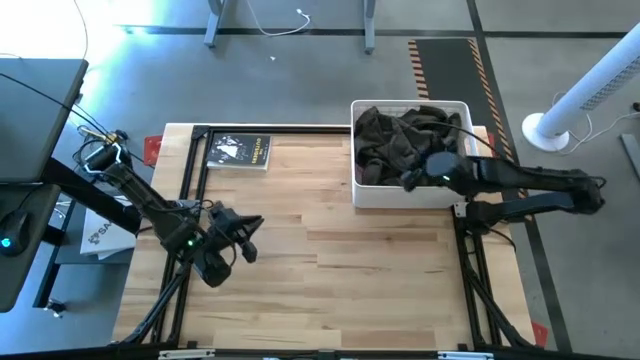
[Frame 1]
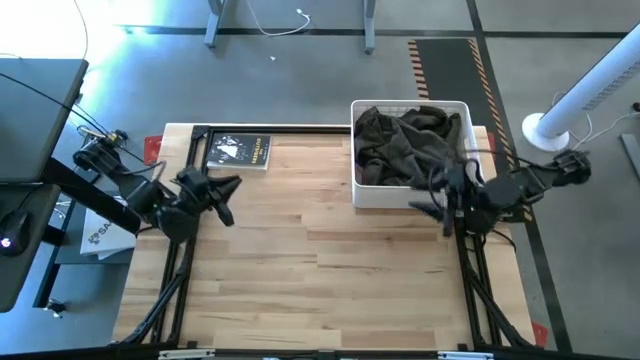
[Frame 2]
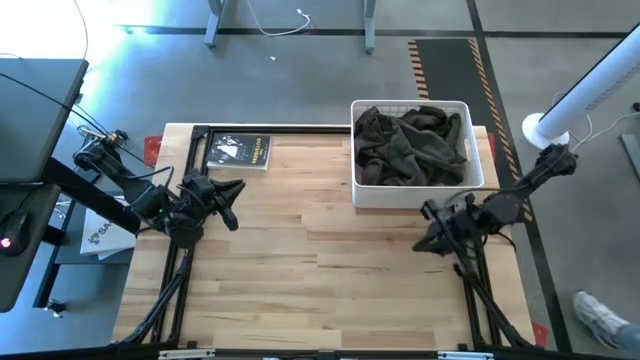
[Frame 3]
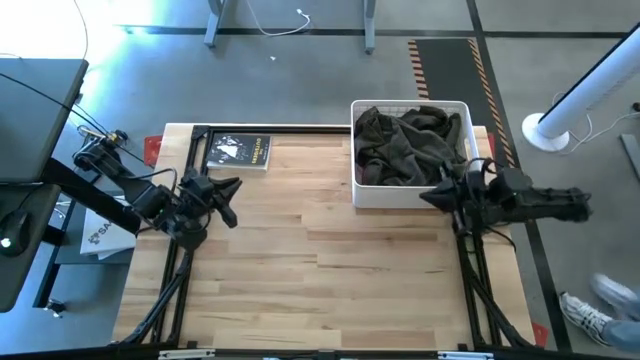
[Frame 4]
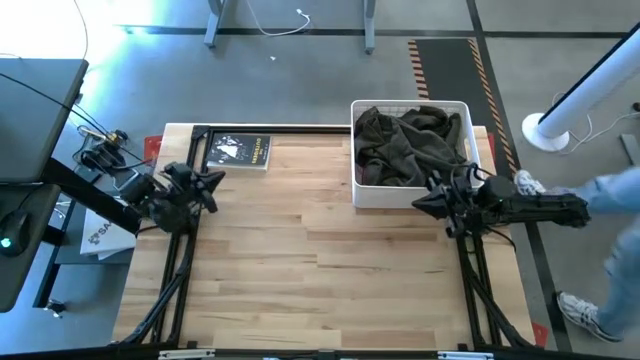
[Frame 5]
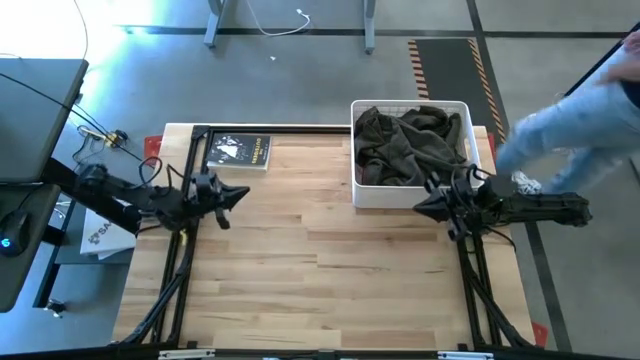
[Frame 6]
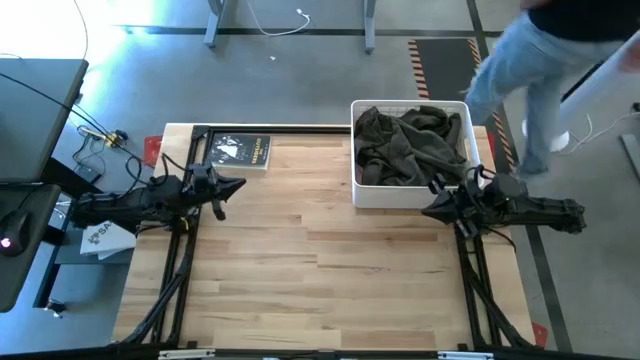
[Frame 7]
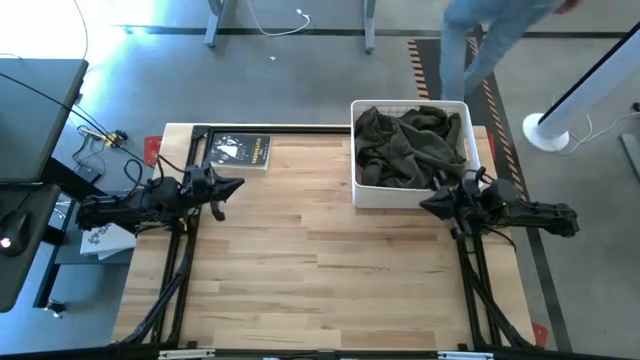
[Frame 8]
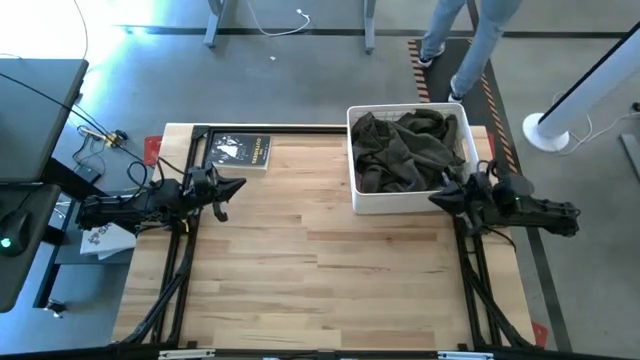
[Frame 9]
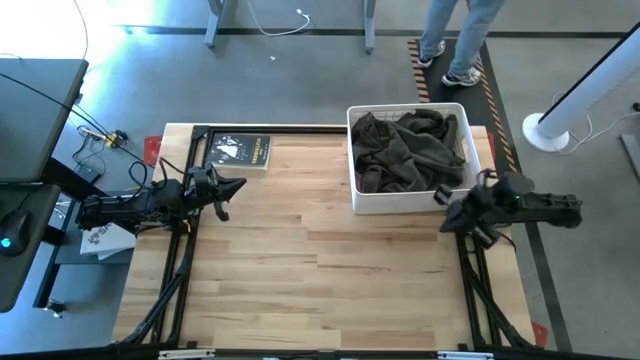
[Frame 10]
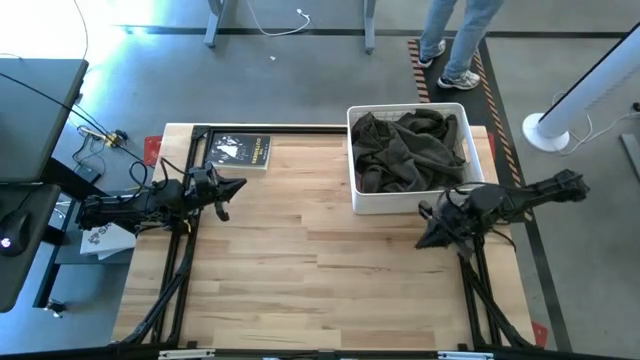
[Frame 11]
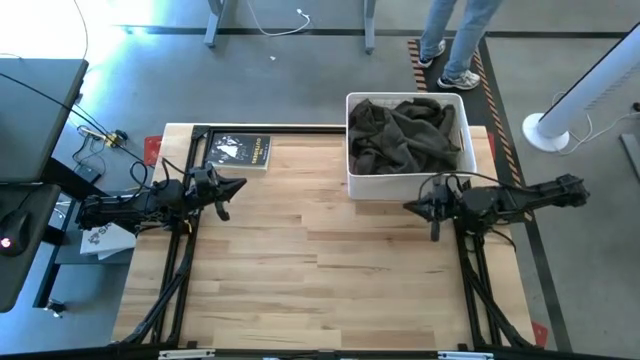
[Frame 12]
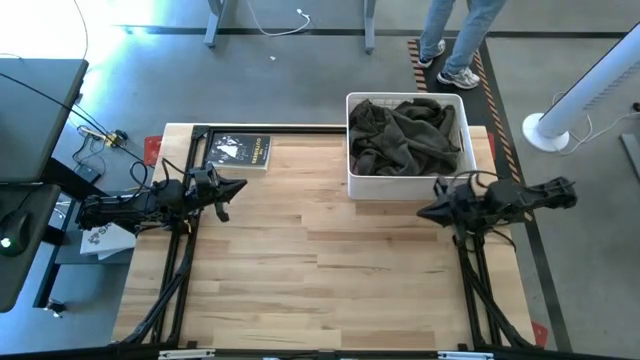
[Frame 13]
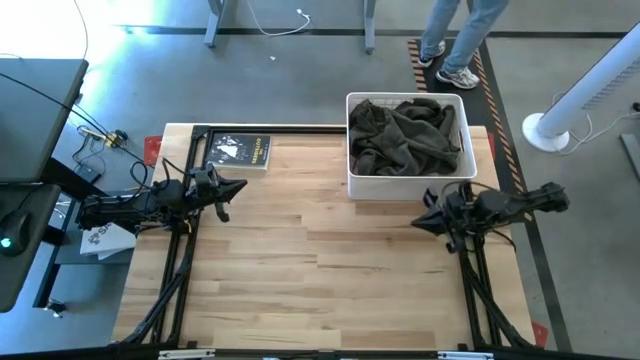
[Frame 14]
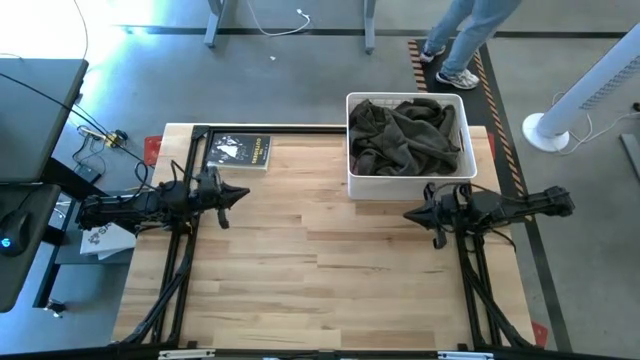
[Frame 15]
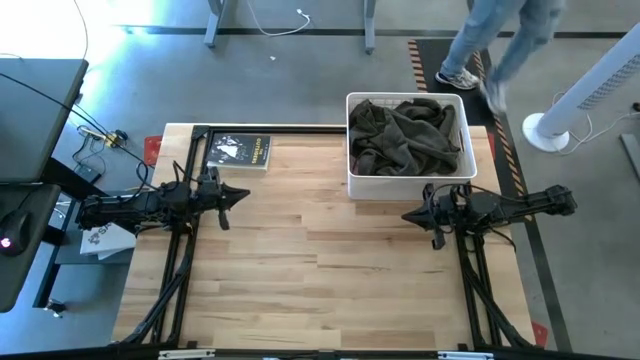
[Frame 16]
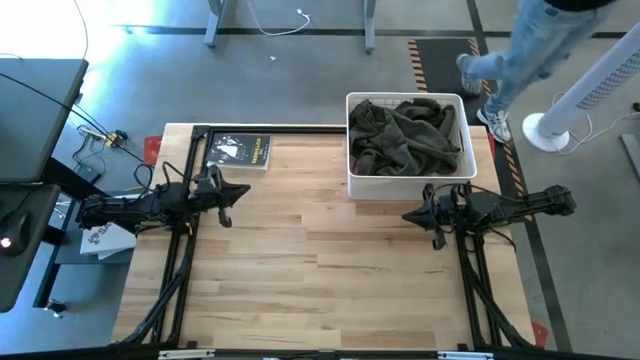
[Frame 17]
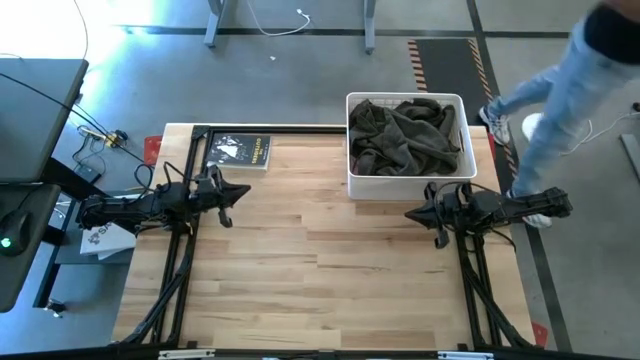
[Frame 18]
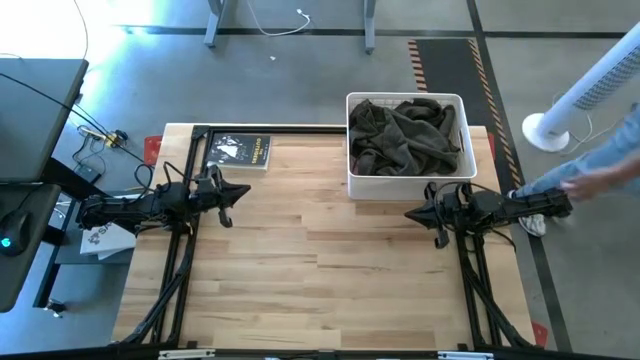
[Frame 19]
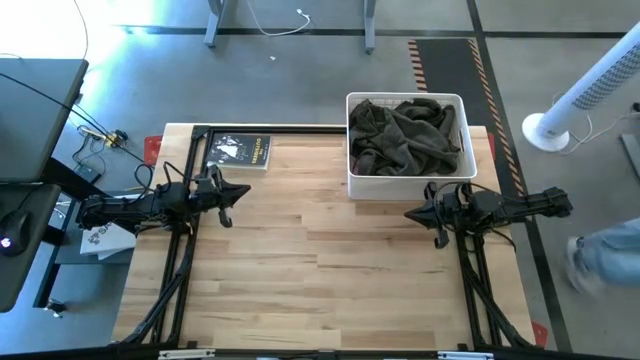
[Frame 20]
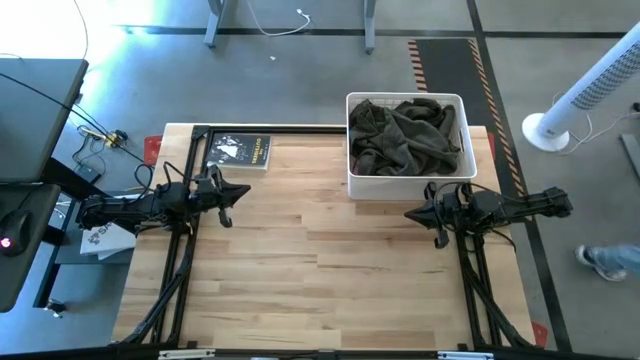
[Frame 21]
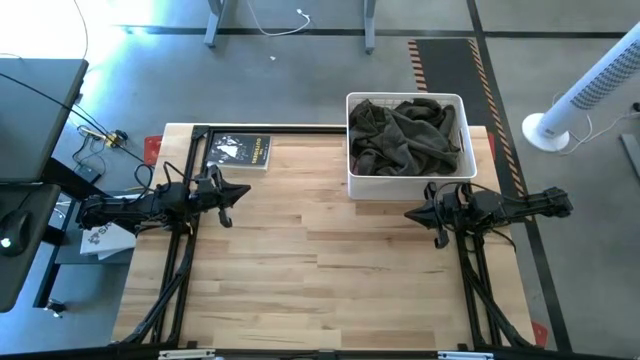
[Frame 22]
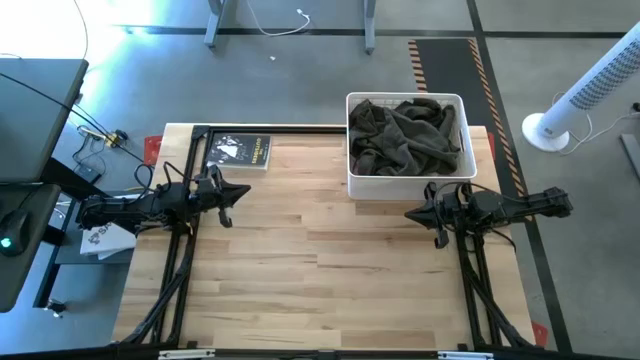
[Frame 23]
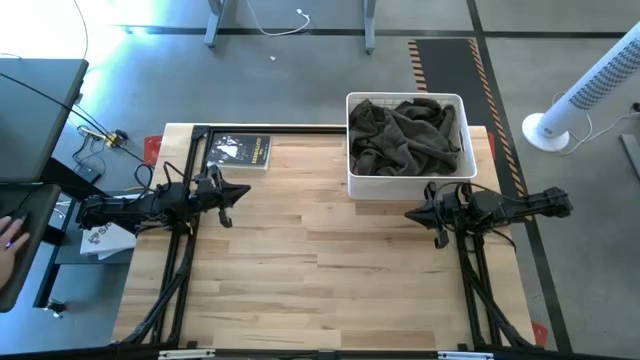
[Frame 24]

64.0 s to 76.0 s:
Task: Sort clothes
Return to Home Position

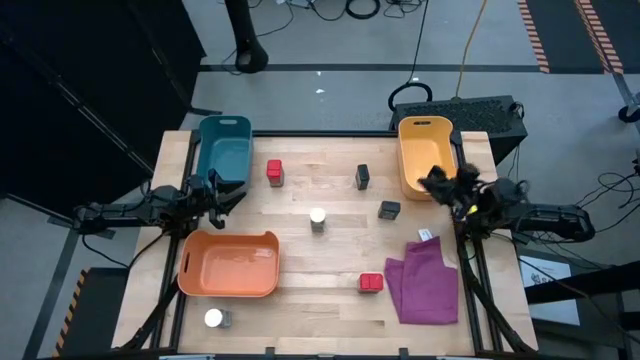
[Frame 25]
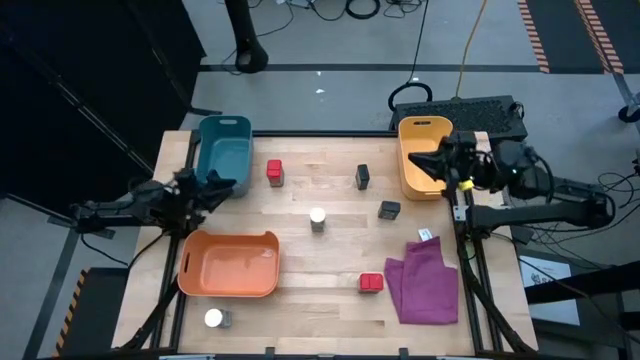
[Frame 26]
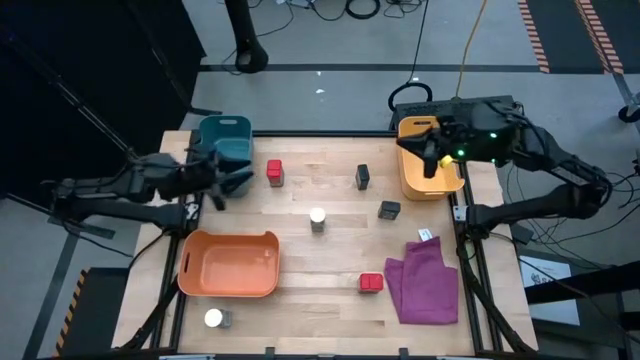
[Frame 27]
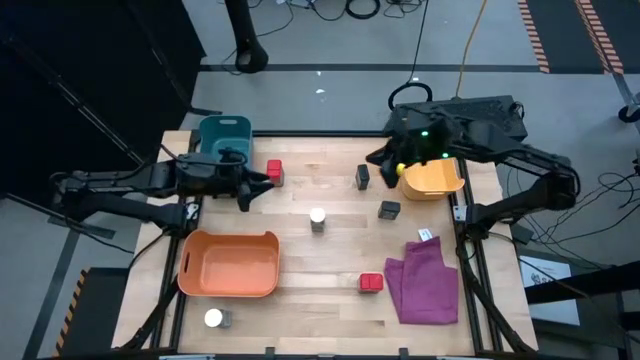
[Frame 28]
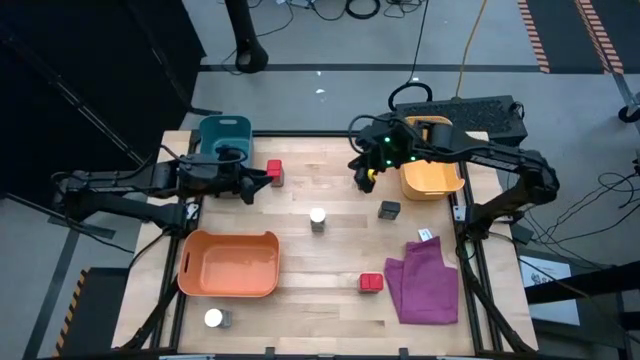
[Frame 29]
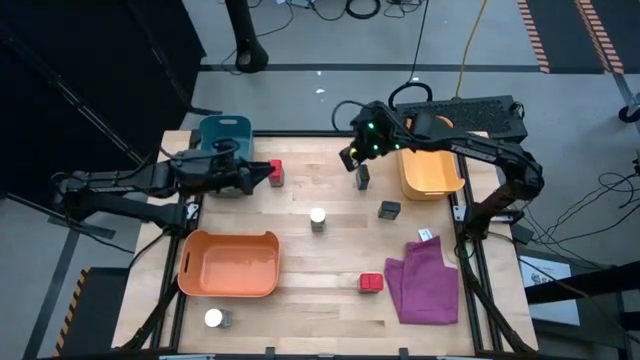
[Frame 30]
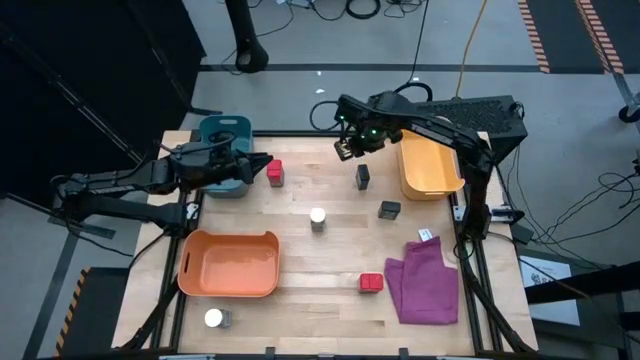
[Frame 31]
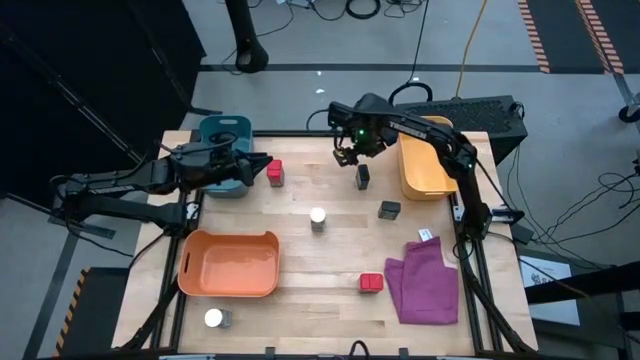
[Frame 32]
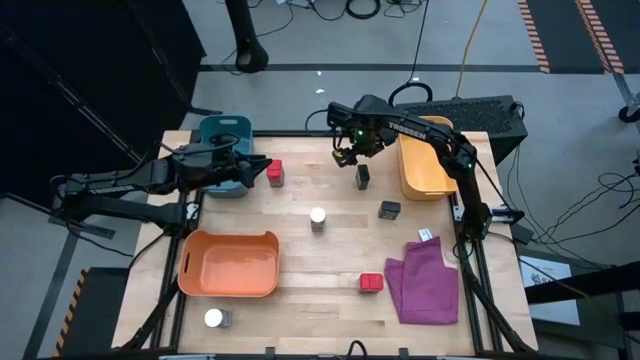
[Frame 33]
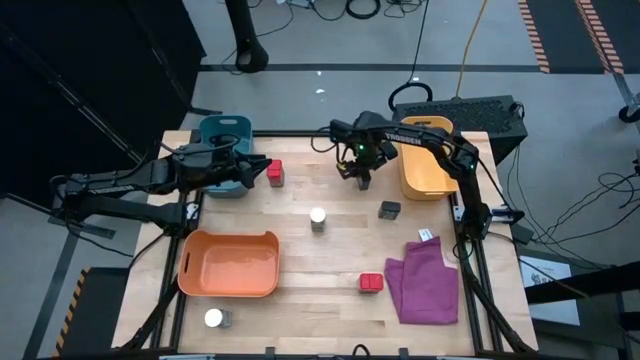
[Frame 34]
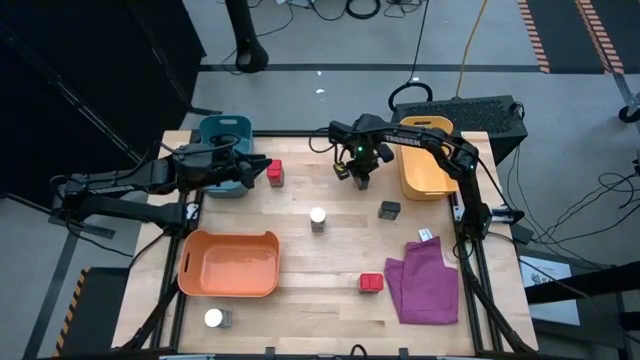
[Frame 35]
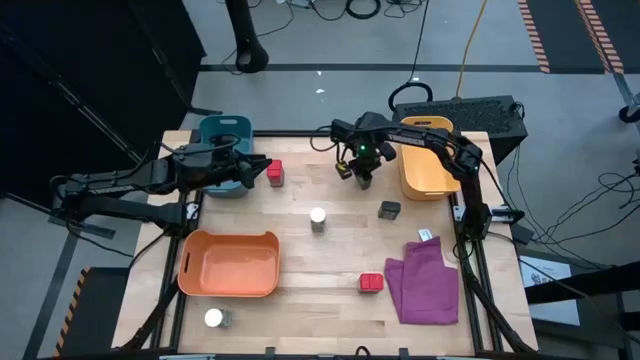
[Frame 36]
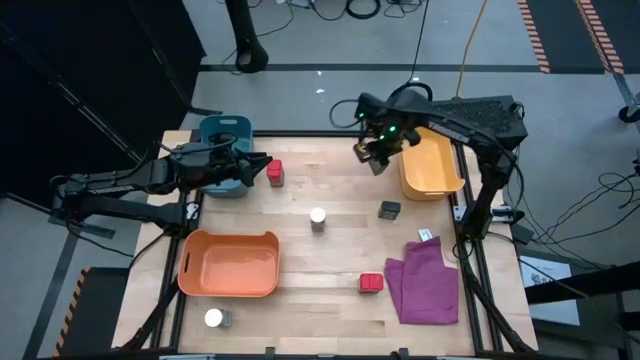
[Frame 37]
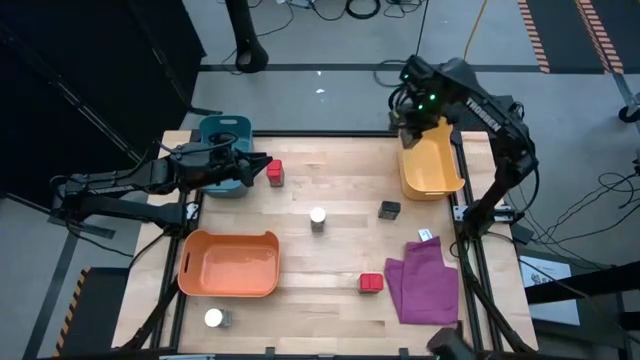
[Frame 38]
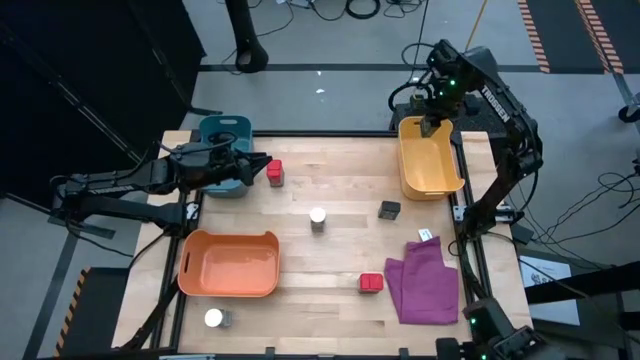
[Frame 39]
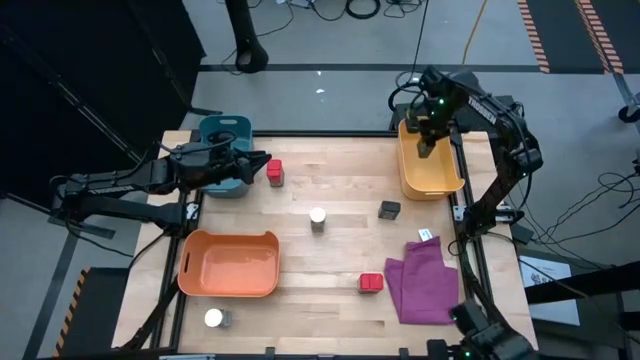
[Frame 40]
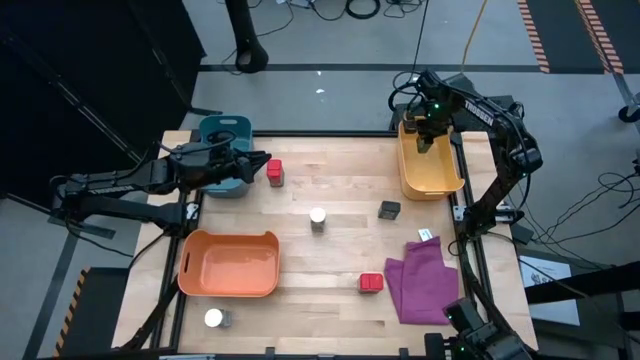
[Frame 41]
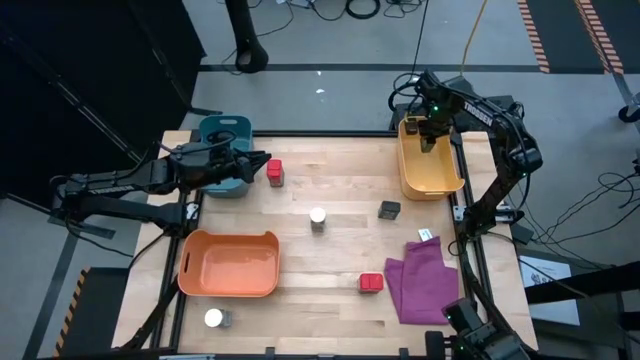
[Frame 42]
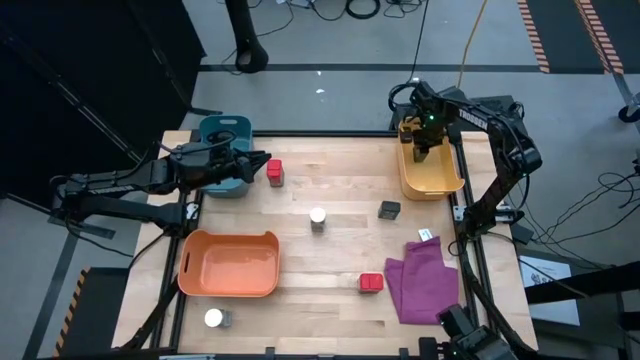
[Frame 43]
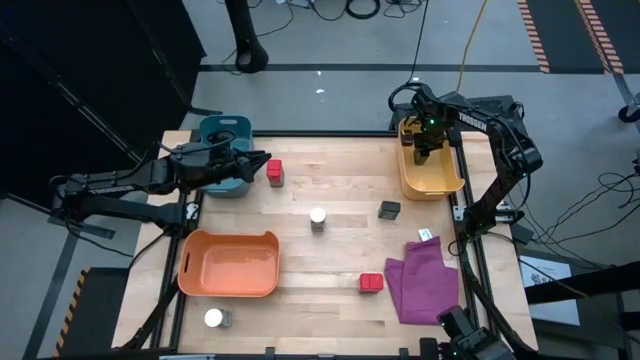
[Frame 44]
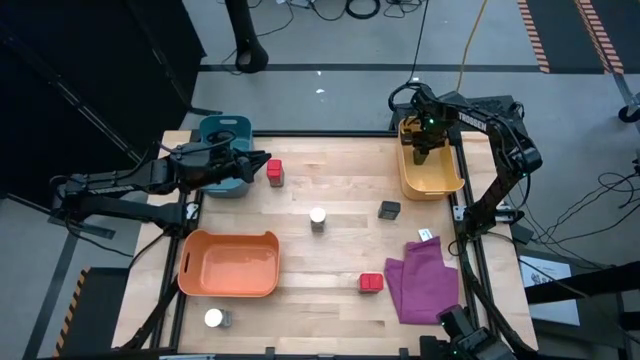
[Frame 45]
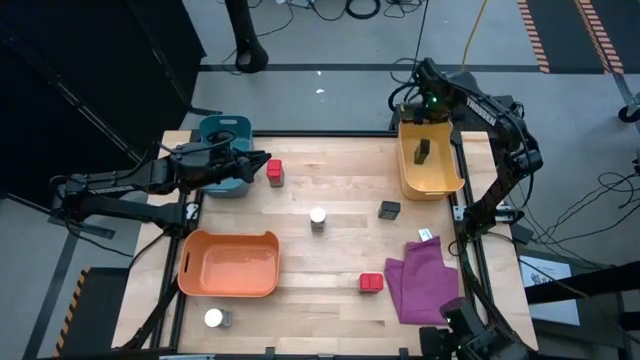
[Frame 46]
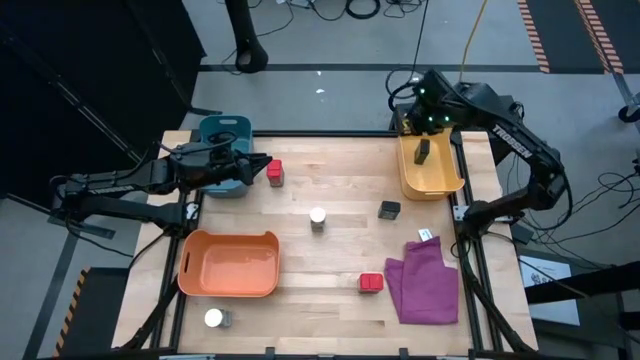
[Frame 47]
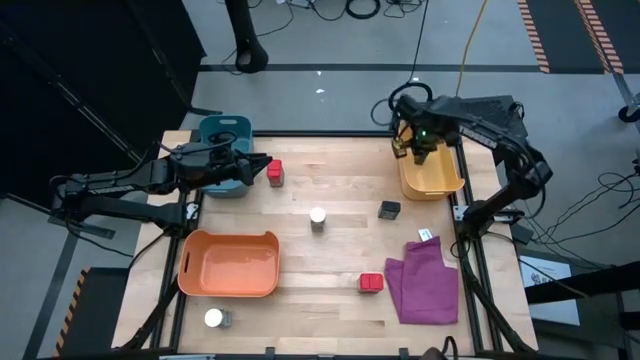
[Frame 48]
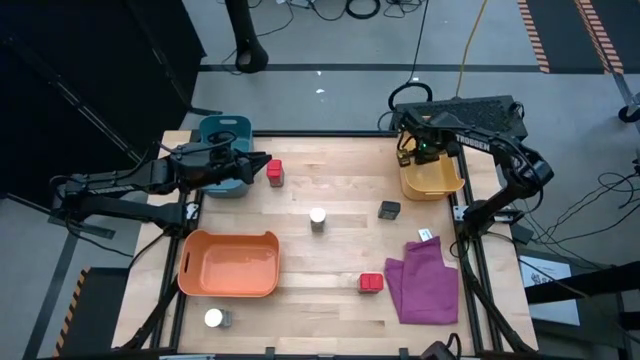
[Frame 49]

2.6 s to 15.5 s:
Task: Sort spices by type
Put the top black seasoning can into the yellow bin
